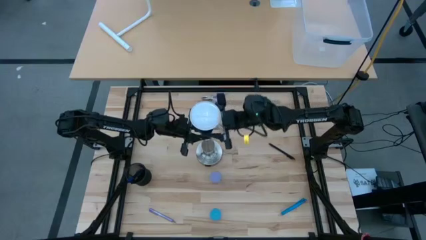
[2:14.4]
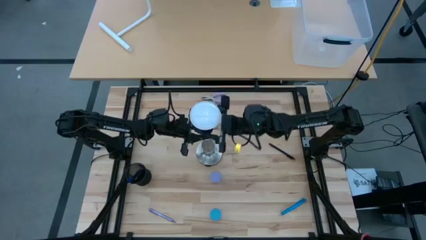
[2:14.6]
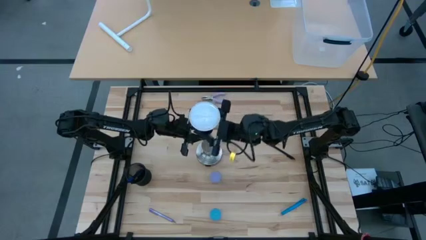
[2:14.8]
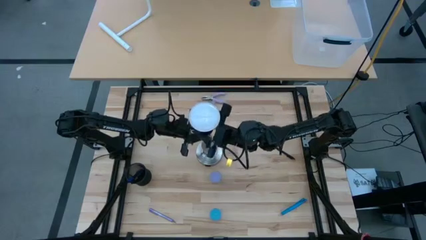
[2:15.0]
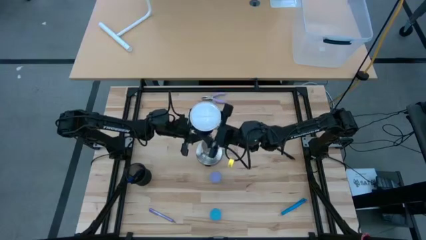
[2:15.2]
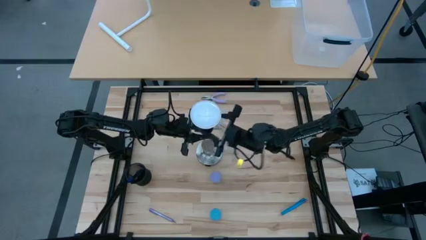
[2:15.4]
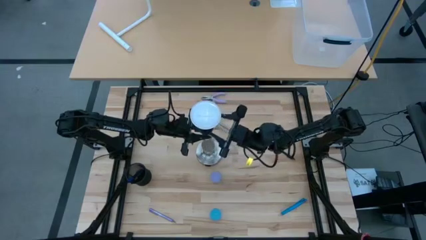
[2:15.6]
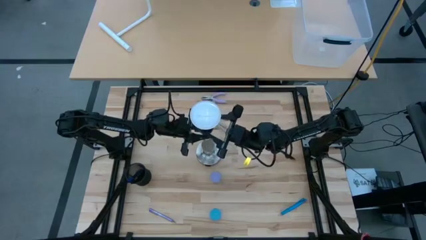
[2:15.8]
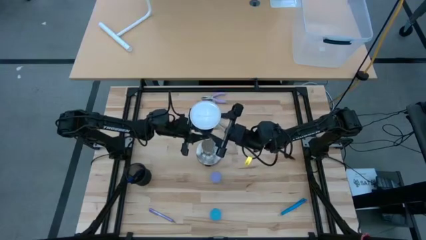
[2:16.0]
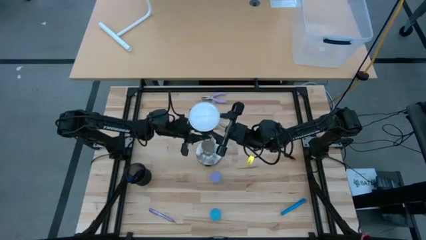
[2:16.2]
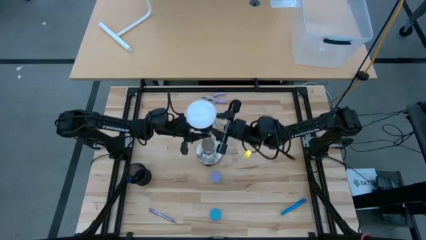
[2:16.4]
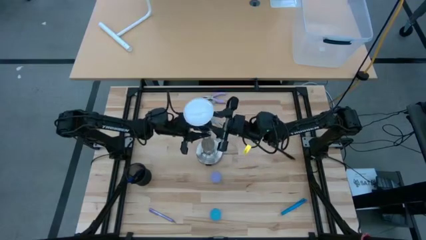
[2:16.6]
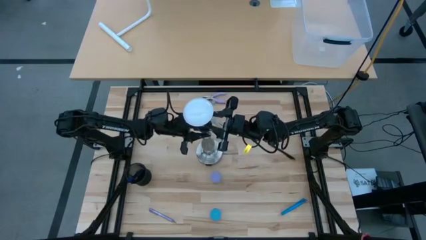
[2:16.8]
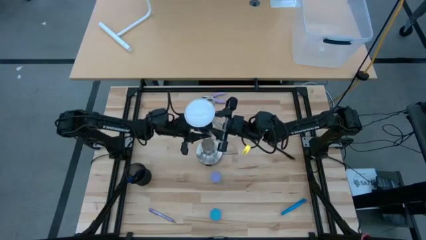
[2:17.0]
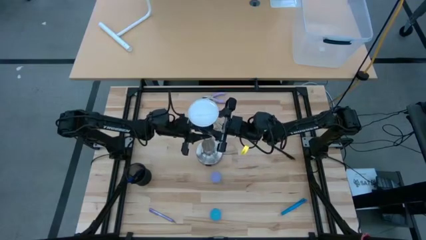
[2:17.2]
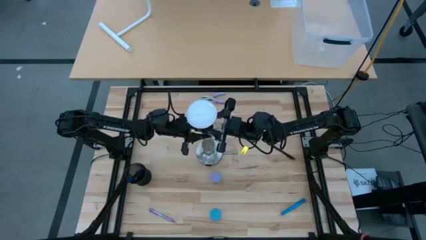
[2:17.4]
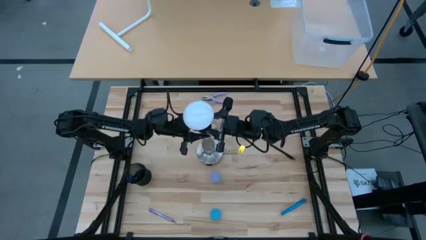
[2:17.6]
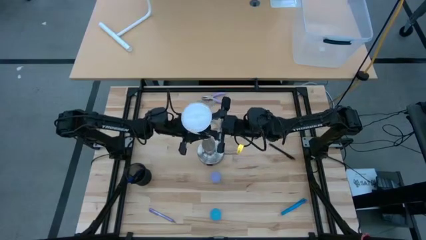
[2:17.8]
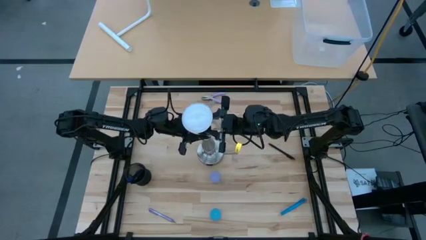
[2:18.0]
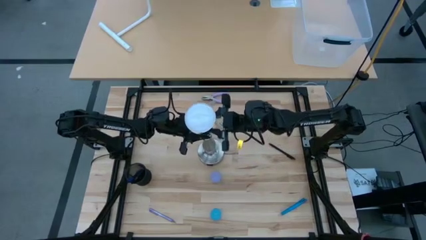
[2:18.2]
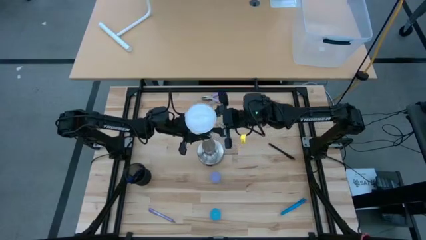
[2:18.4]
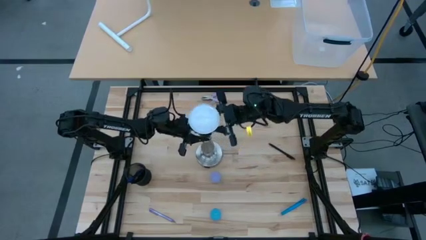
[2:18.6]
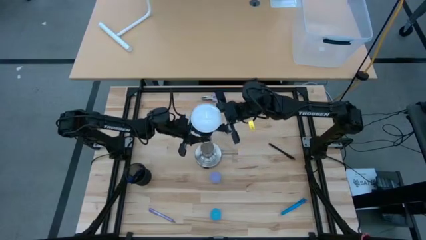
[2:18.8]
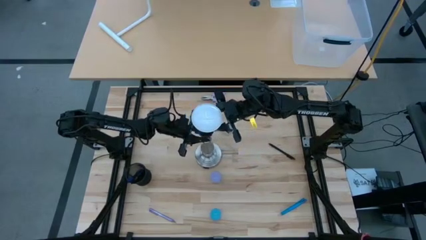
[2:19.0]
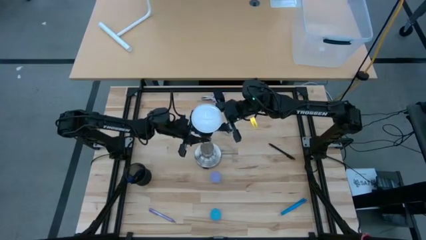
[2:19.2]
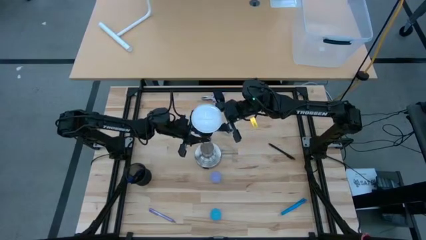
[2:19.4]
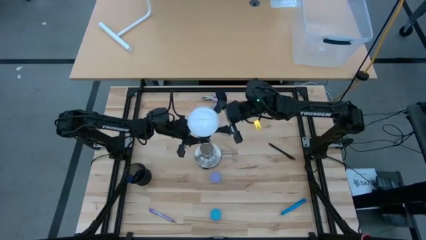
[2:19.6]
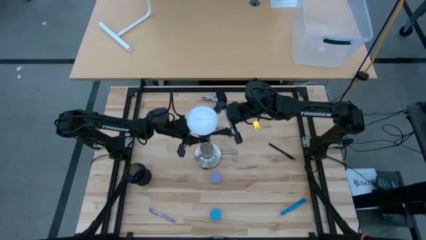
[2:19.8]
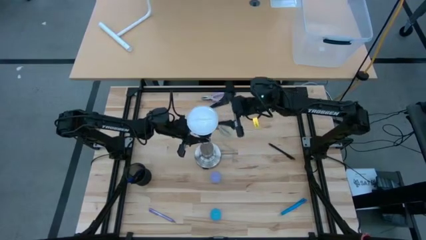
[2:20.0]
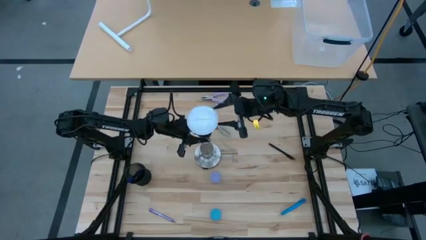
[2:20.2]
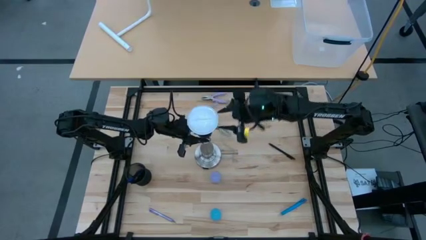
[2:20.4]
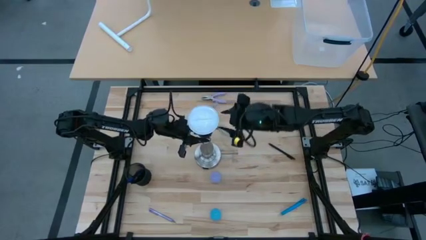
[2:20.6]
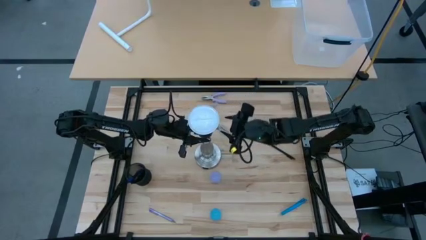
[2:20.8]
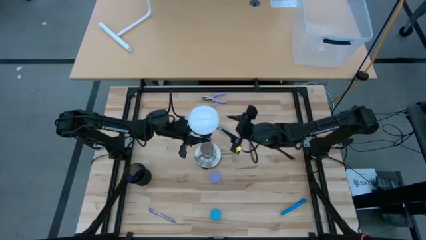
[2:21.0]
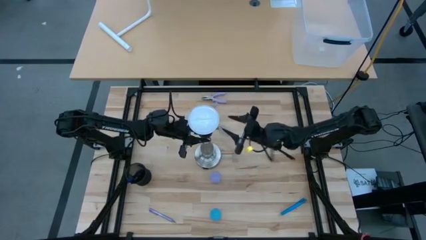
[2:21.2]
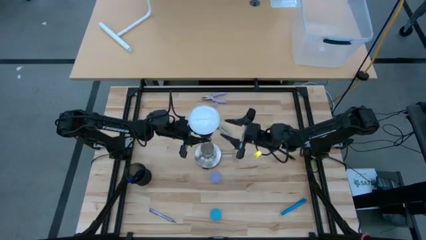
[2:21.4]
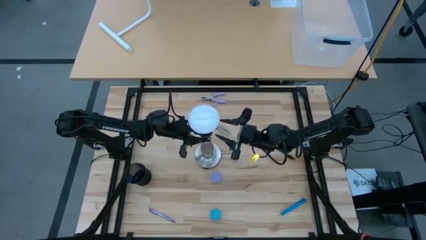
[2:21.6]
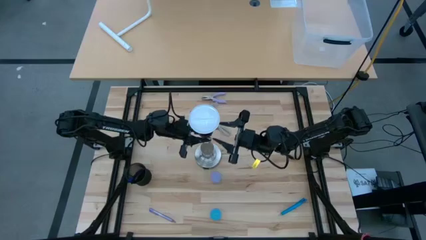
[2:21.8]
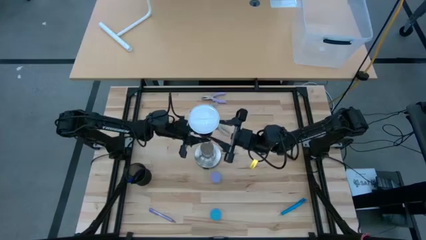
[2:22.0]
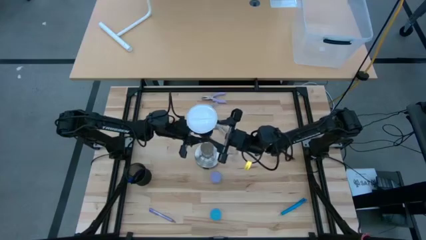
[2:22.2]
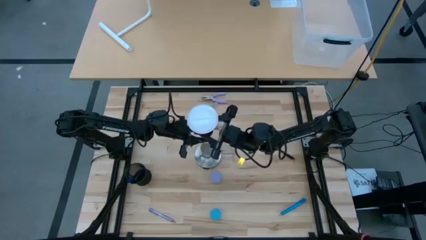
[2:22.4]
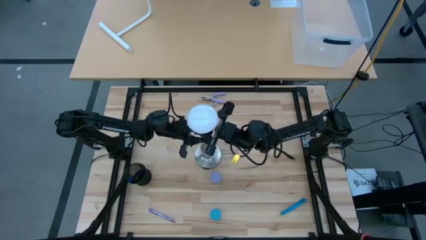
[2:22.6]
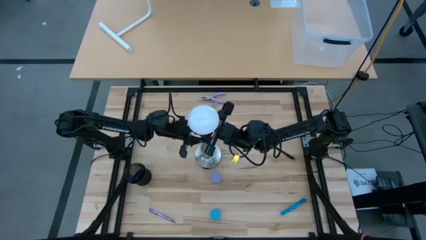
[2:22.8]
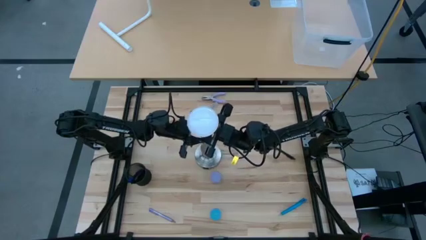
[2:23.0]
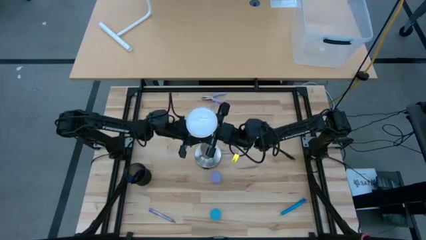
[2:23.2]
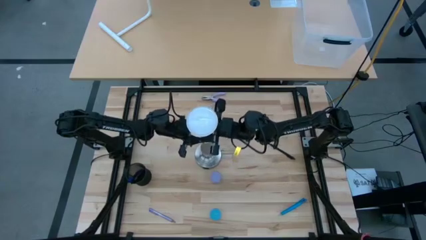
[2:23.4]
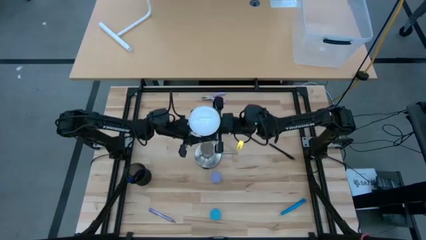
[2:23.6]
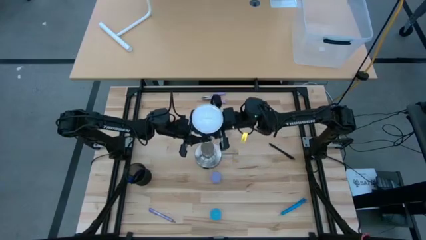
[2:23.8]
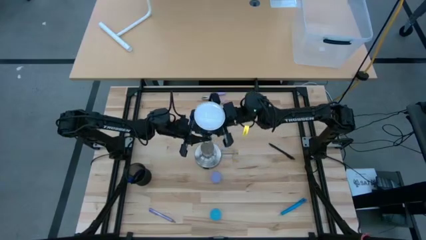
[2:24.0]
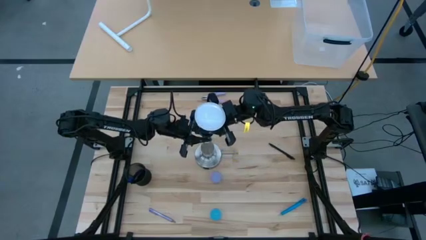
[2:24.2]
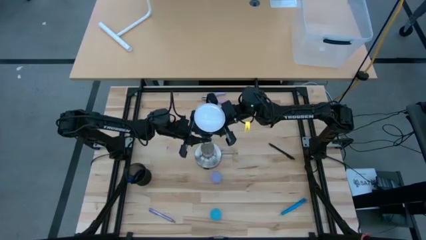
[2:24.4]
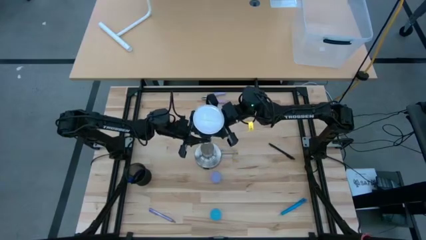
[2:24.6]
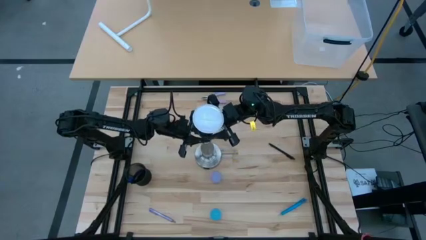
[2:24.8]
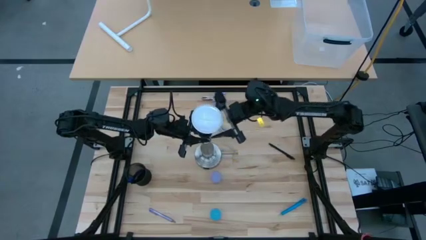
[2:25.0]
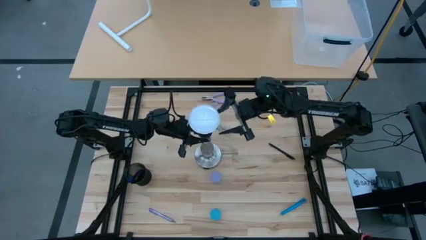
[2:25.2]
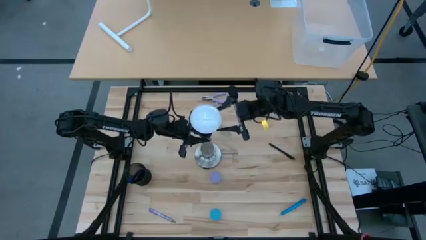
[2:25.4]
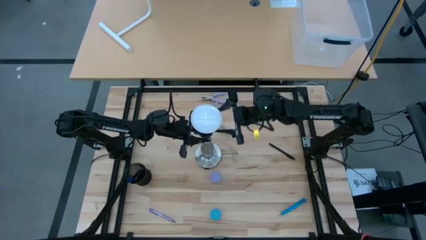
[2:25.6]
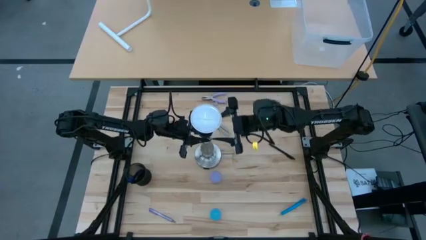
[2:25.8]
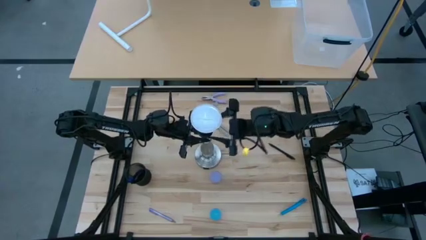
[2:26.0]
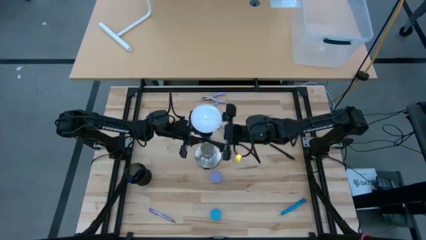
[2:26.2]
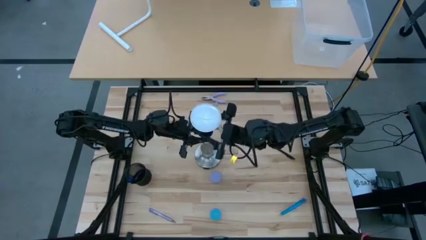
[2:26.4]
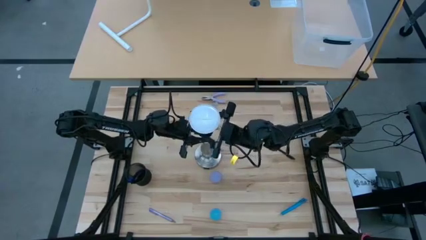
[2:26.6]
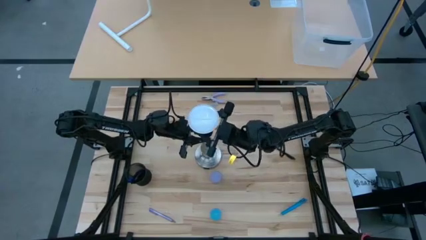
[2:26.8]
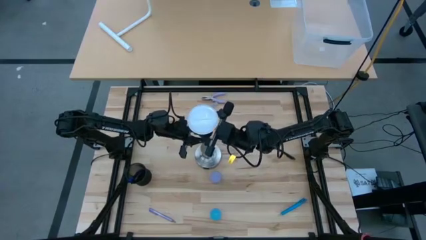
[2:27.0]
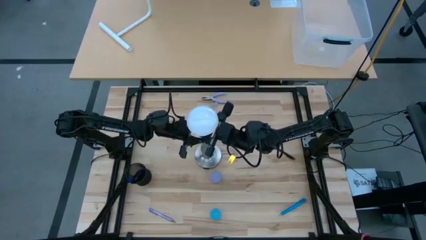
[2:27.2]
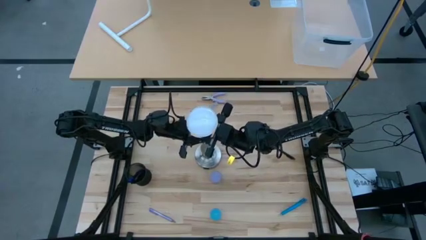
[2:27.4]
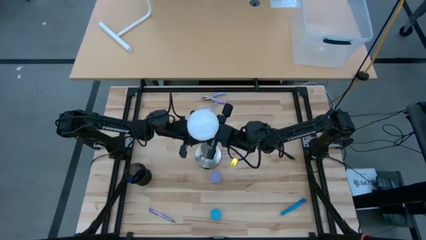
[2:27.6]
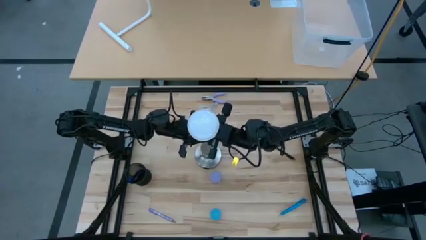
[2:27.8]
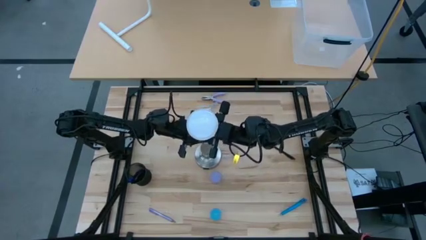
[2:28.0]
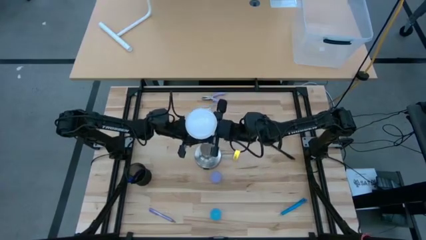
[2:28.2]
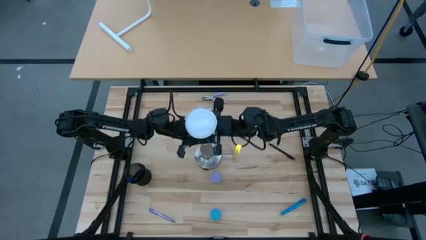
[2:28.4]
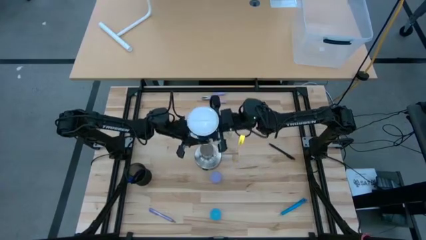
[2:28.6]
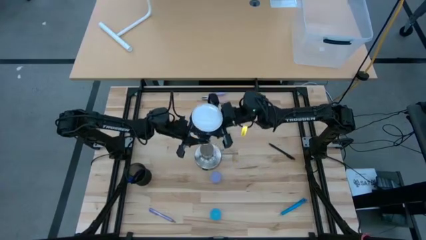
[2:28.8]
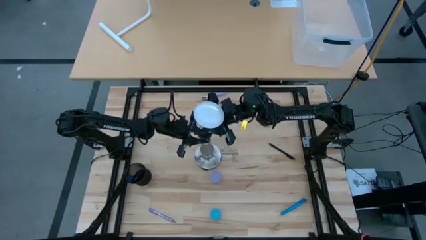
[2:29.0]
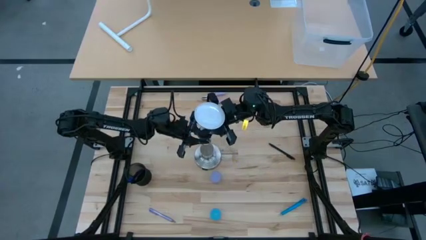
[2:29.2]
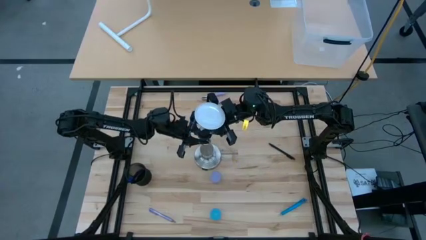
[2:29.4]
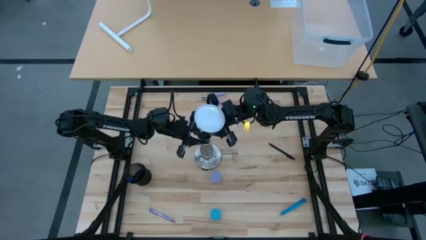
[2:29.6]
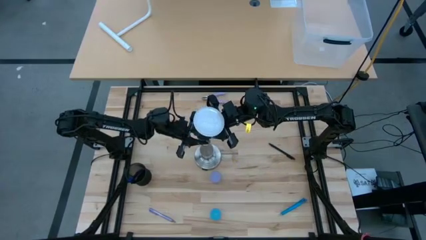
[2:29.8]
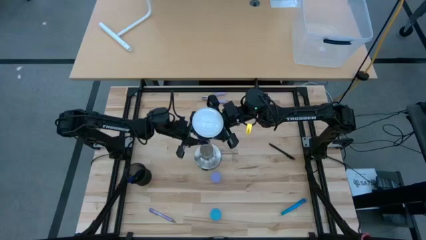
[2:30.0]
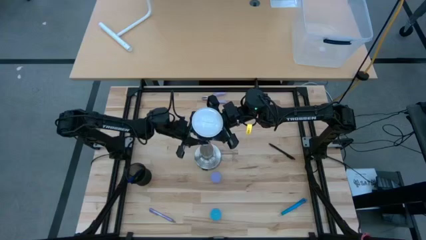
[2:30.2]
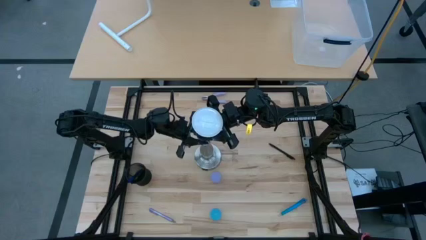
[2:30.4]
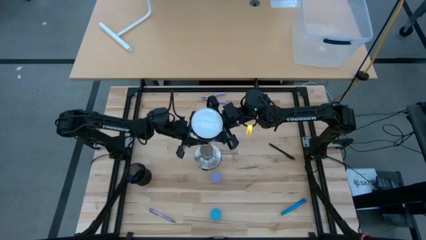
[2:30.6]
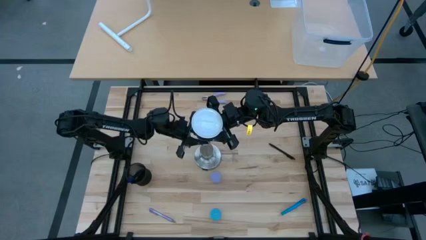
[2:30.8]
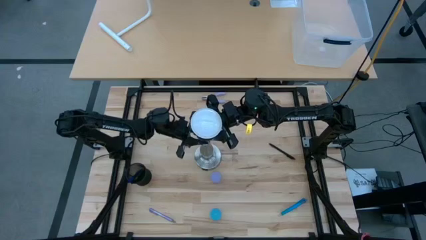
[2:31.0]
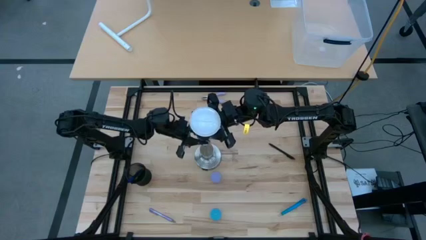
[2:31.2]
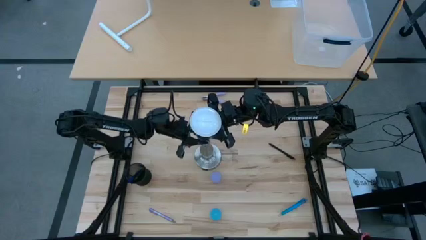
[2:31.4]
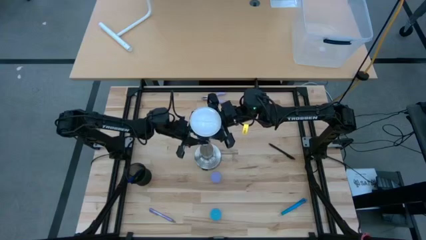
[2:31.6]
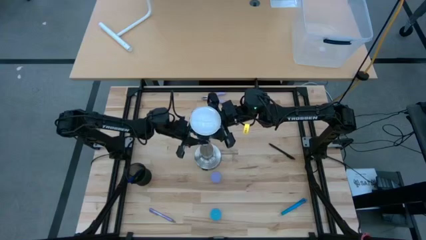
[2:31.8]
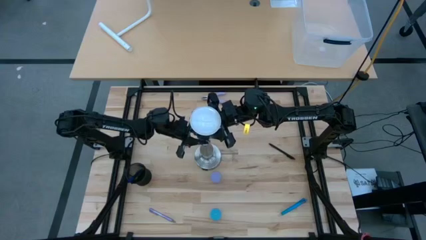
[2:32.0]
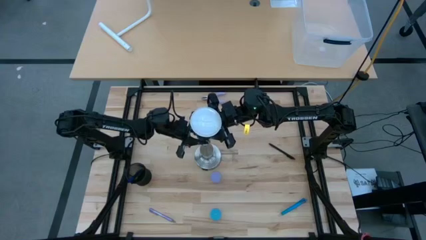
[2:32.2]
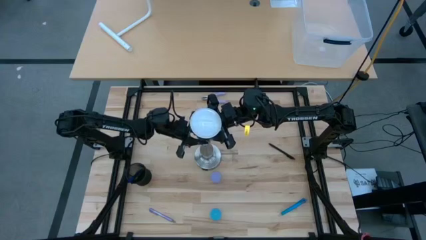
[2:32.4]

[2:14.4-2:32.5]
Task: Screw lightbulb
Remove the lightbulb from the silver lamp socket
